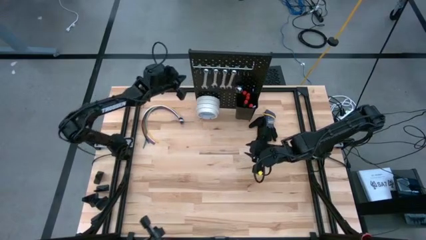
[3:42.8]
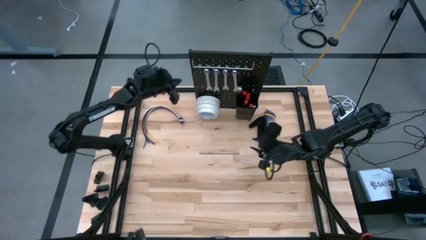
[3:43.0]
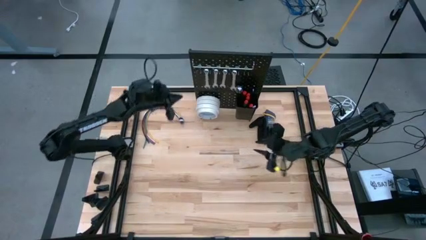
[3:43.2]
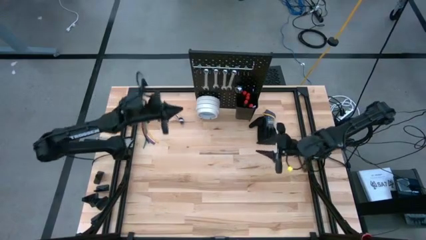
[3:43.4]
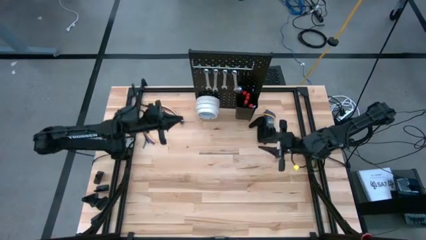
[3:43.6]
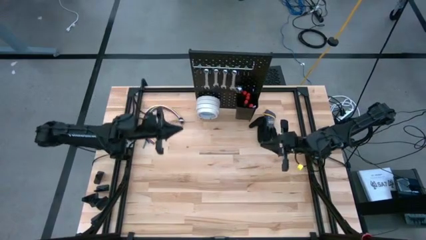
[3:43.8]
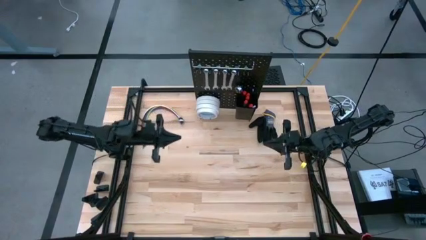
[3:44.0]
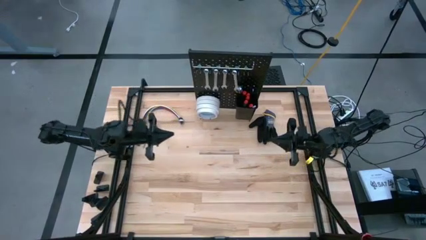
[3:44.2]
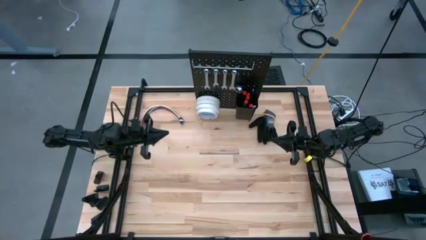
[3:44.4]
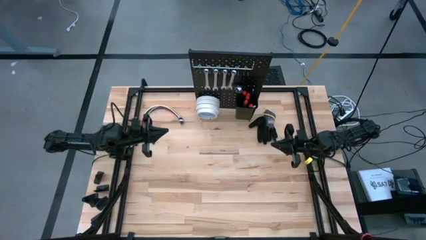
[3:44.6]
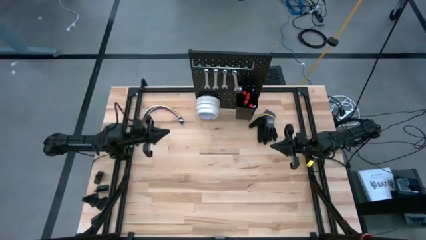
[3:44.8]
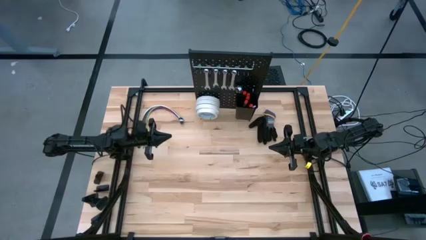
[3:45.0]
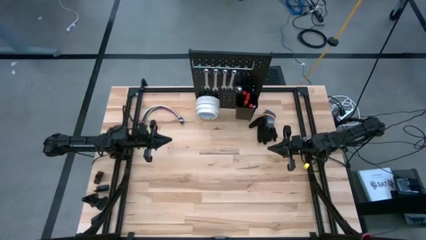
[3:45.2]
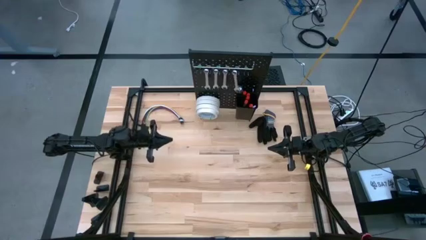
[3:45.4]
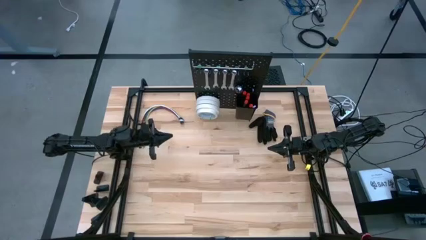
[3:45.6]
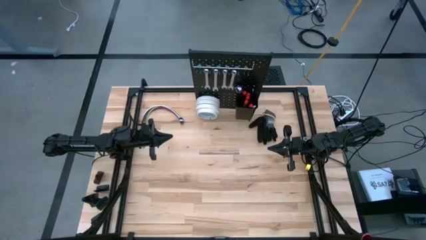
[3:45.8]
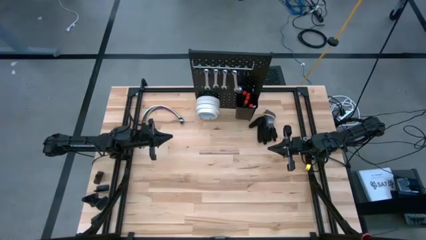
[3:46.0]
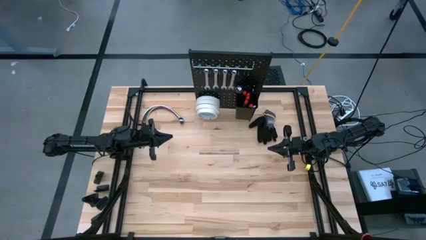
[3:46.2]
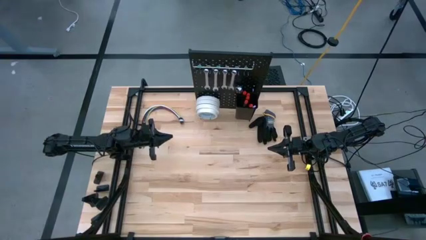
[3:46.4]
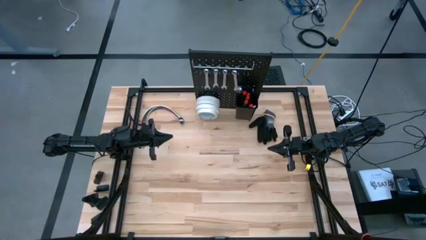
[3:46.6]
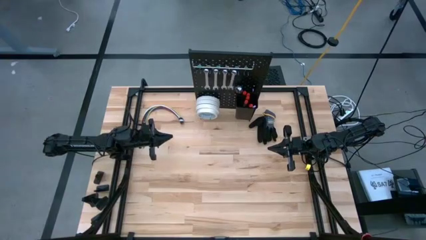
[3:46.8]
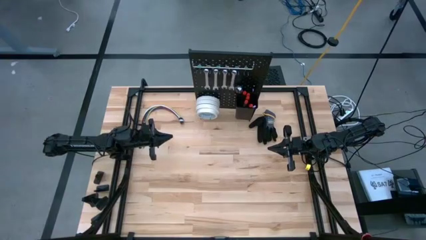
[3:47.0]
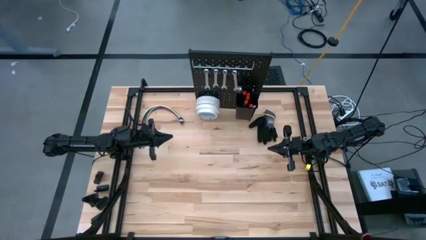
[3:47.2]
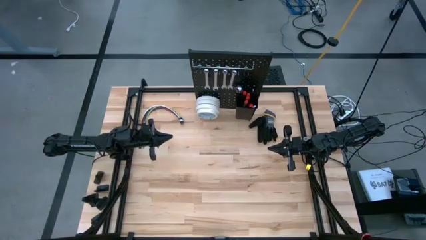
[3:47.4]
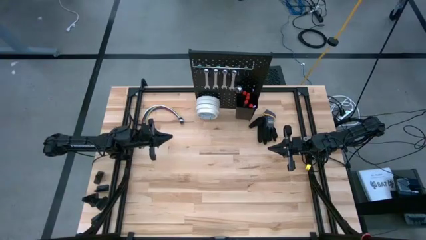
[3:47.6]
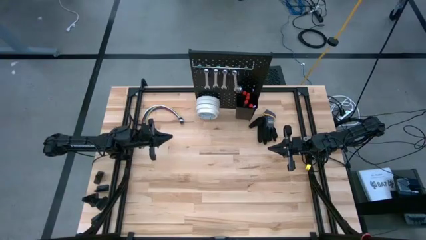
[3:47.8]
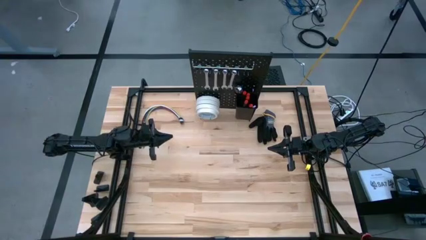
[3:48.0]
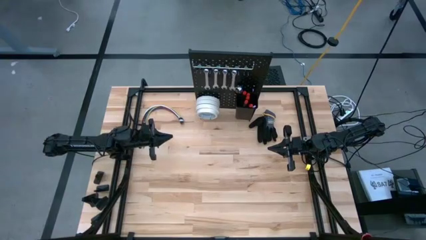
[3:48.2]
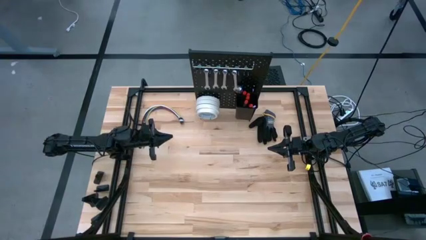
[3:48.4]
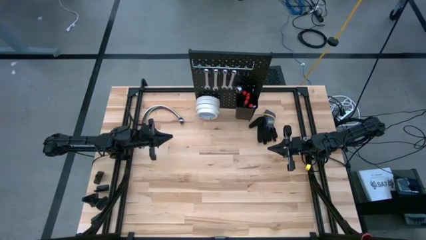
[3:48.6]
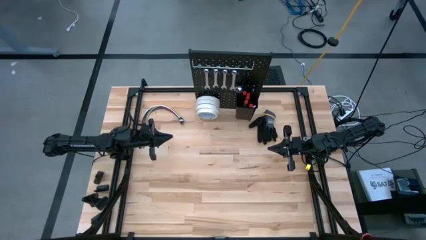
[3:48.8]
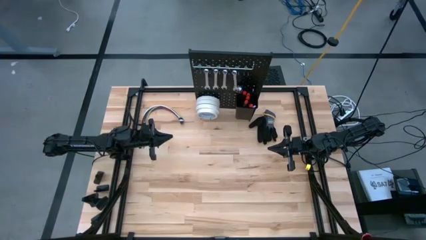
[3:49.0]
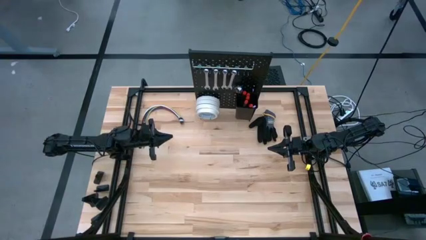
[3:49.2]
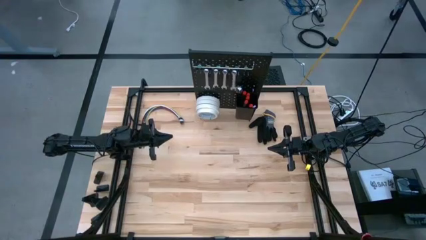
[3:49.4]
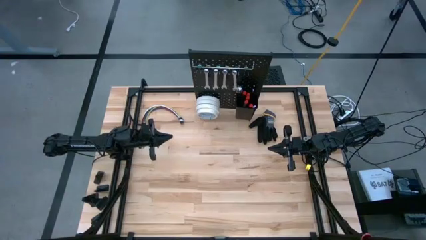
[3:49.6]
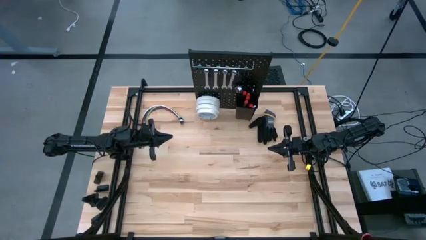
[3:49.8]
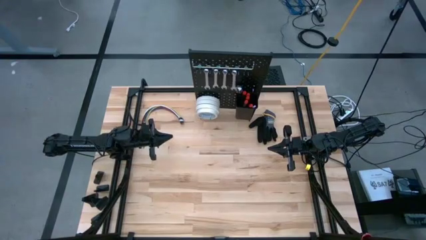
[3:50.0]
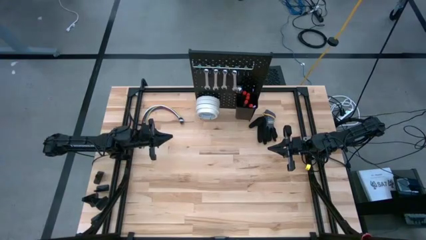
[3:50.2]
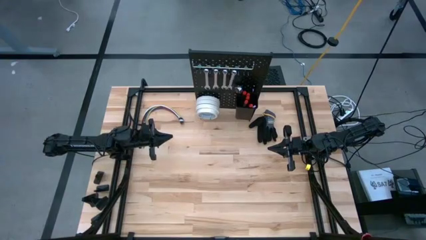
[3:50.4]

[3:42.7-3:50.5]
Task: Hang tools onto peg board
Return to Home Position

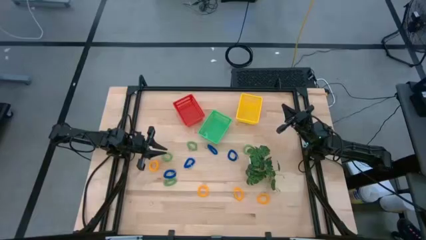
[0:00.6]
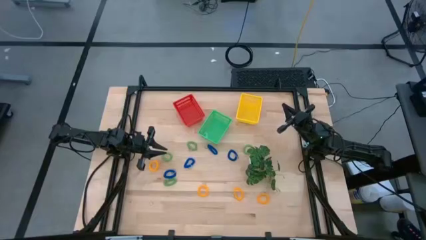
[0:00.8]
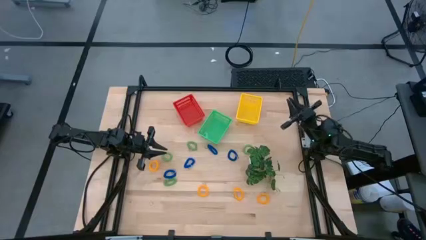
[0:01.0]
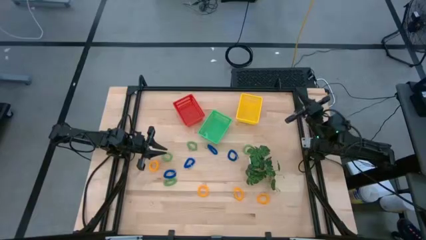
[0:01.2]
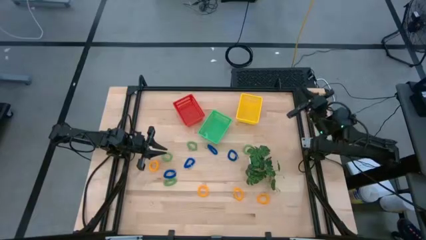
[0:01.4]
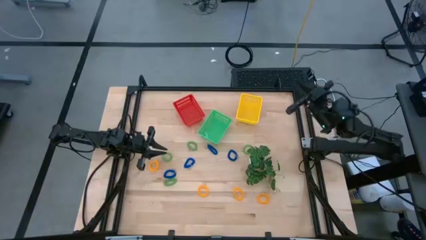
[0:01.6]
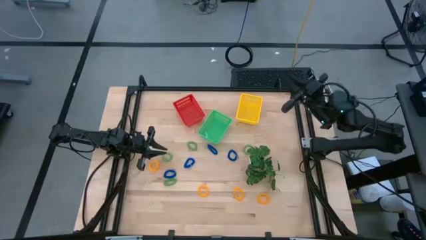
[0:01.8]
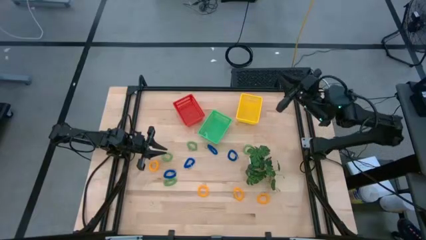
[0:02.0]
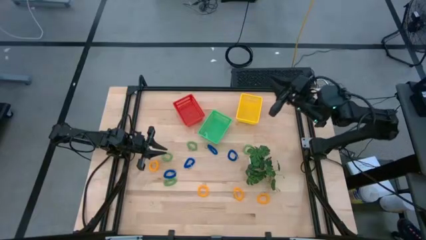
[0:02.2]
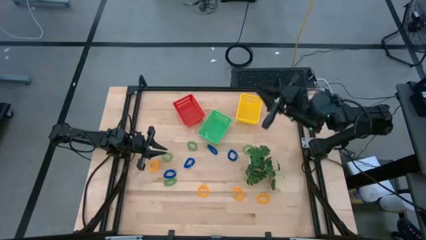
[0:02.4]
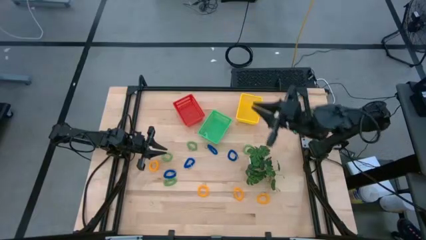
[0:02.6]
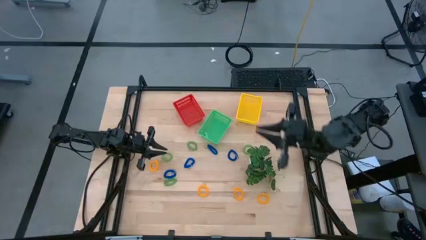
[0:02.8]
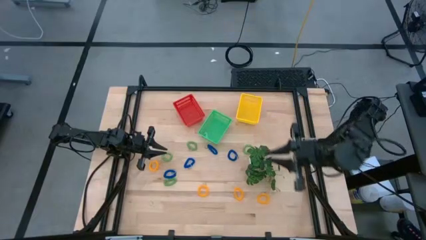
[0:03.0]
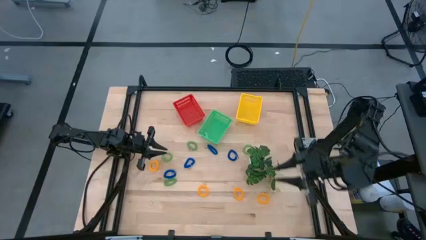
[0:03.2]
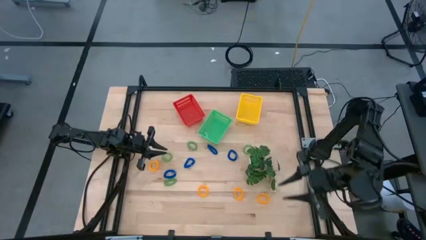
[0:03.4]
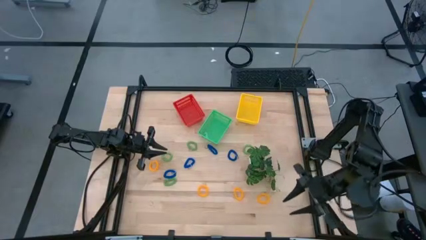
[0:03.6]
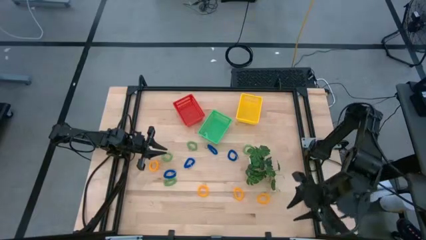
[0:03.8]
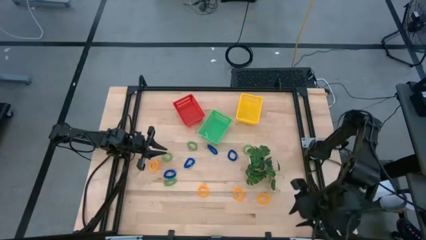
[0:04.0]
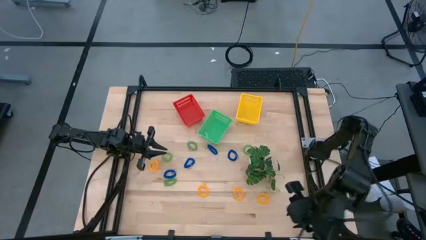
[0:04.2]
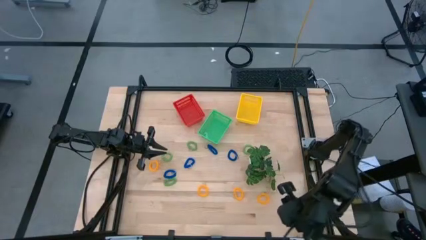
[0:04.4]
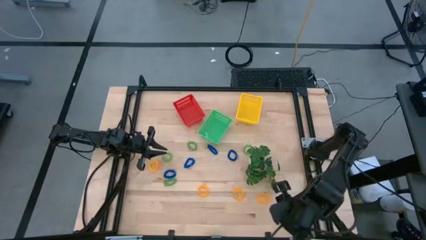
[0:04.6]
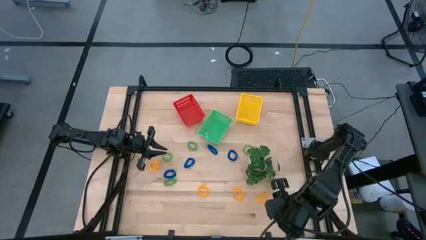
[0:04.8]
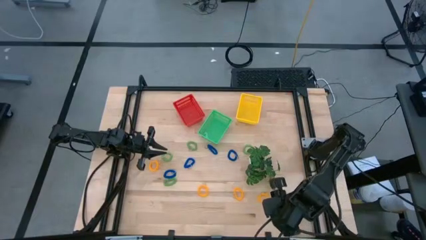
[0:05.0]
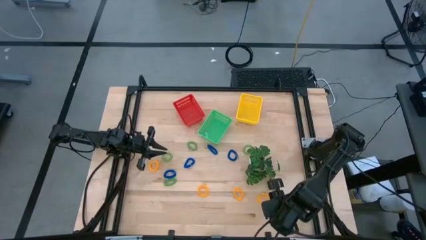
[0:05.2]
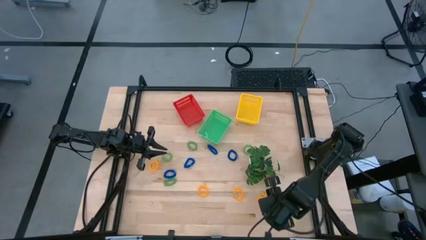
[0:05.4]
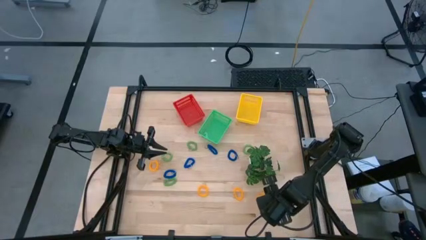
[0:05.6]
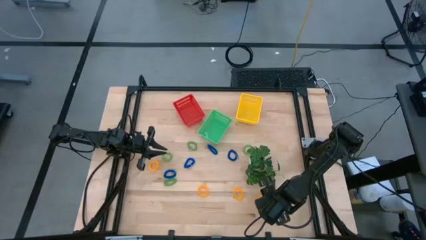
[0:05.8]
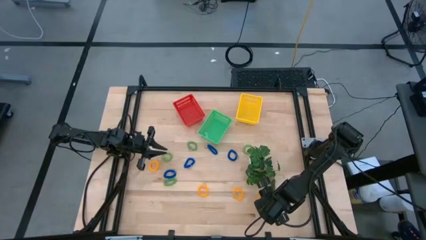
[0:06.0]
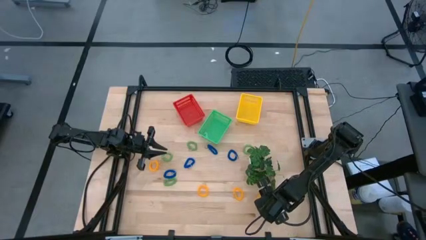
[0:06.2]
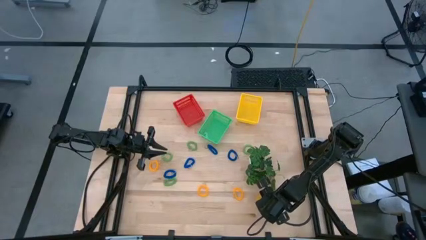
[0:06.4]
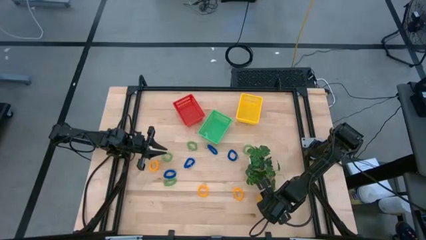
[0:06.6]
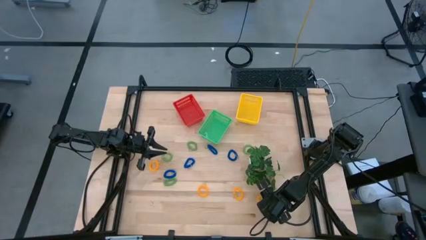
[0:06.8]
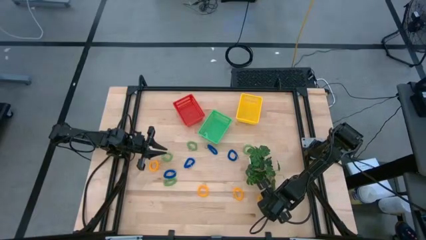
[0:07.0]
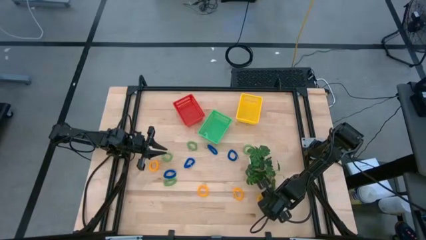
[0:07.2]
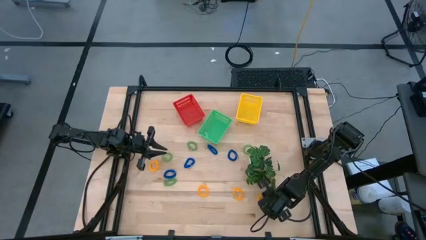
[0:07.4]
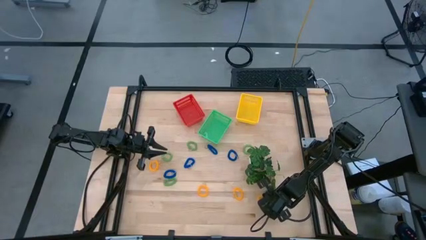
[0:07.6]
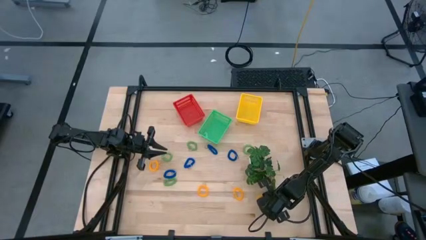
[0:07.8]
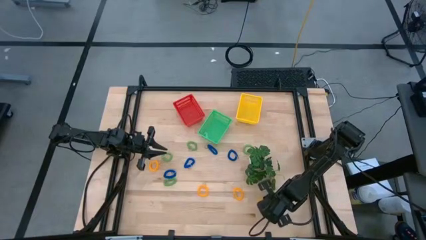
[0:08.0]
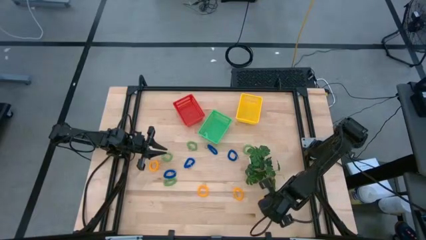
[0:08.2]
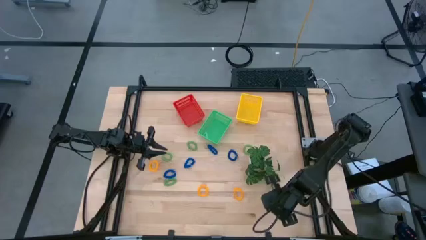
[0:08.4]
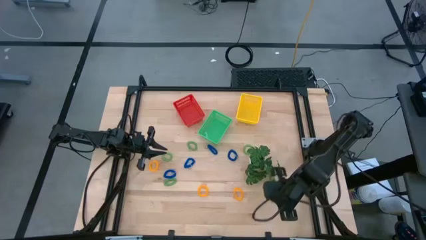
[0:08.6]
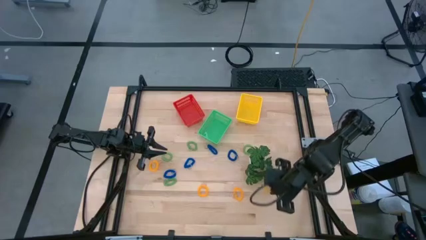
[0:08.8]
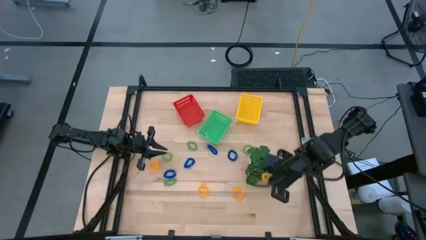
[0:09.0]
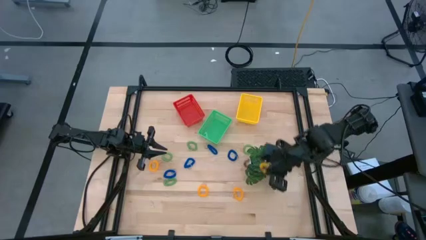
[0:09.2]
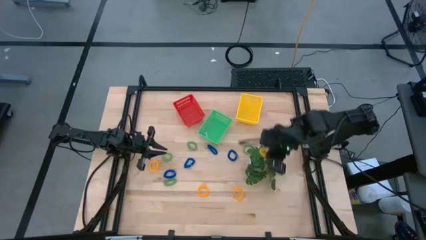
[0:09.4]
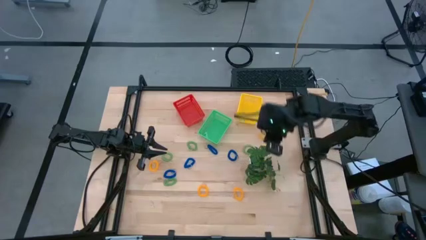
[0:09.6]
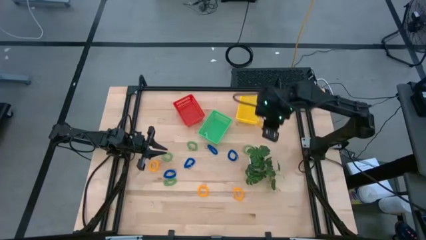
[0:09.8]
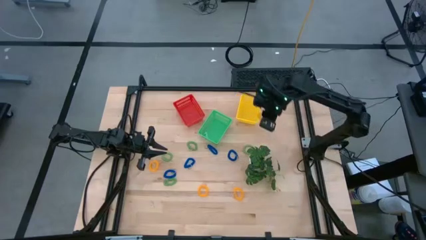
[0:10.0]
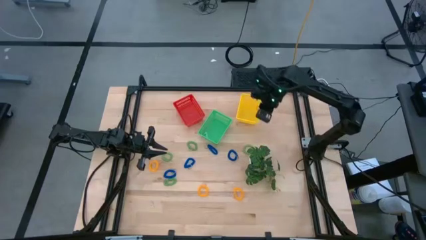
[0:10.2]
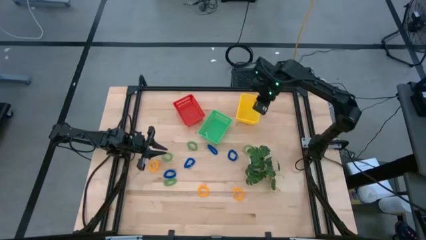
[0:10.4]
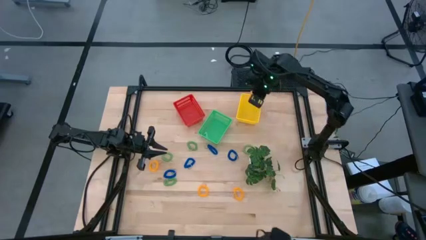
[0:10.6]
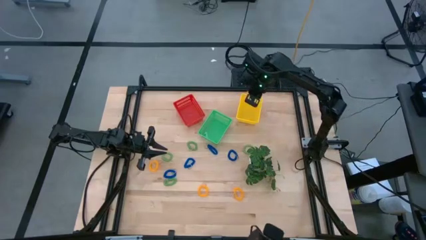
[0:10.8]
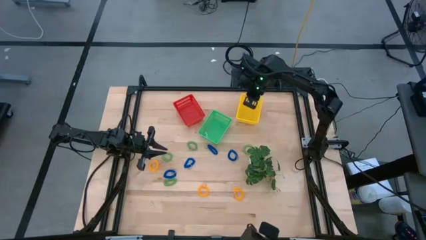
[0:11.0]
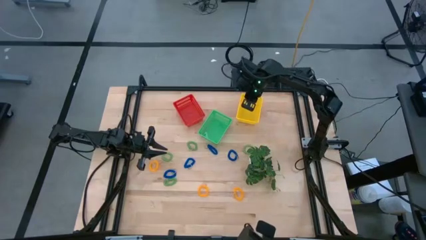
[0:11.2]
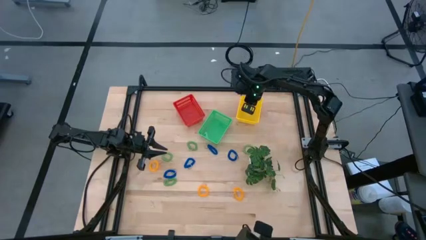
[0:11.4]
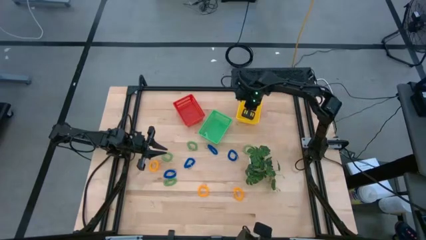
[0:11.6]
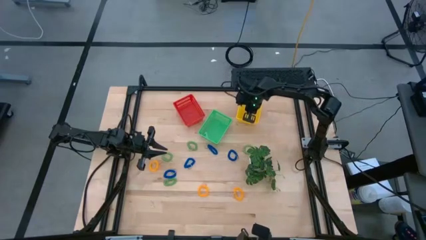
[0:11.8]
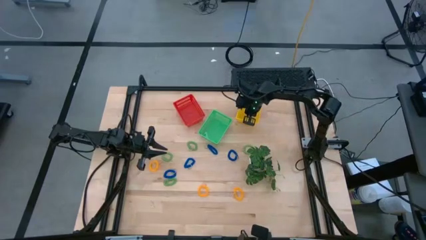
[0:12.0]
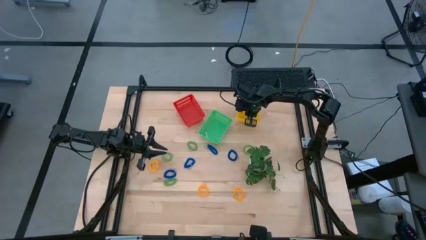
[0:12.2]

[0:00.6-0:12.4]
Task: Sort spring keychains
Put the yellow spring keychain into the yellow bin
